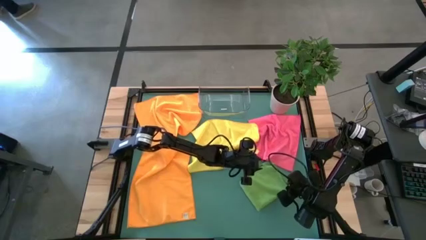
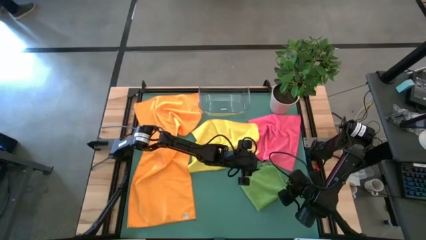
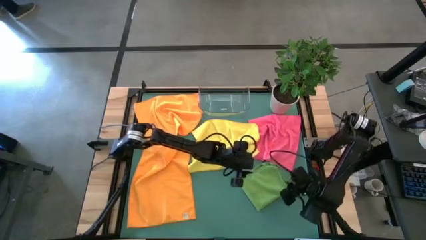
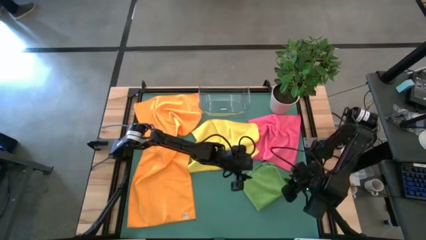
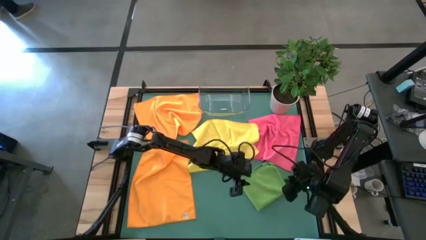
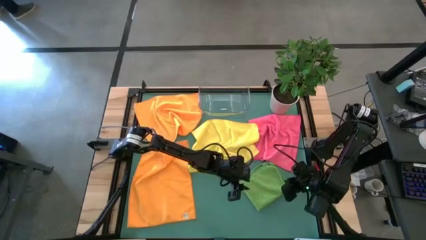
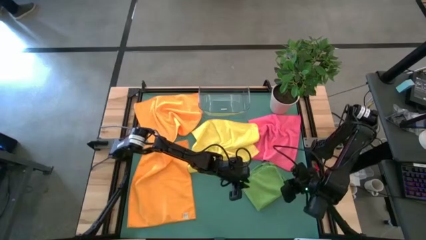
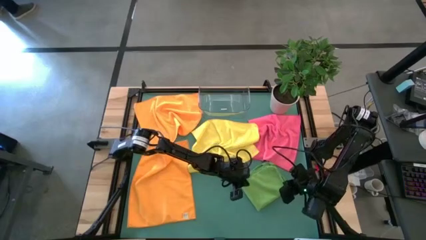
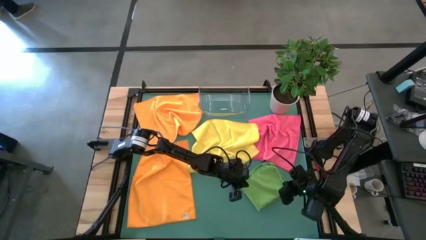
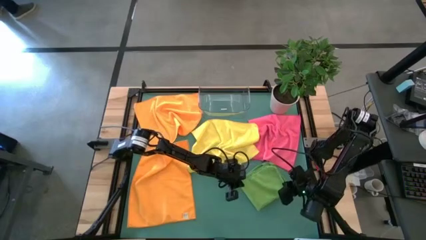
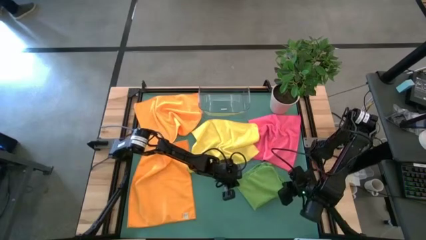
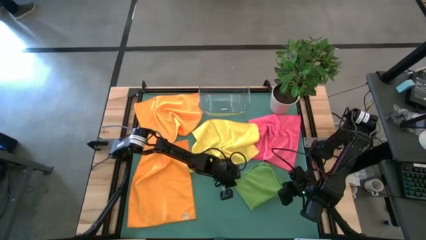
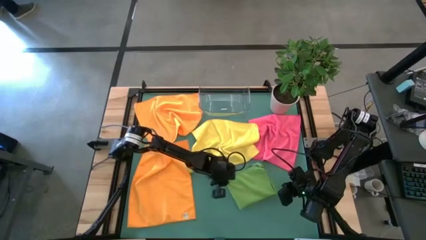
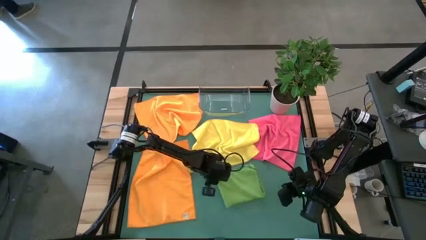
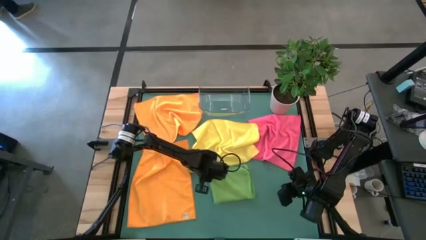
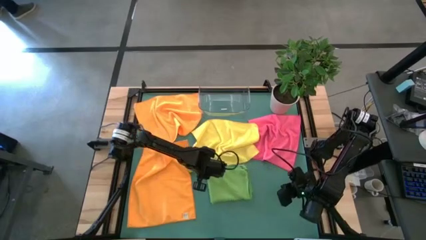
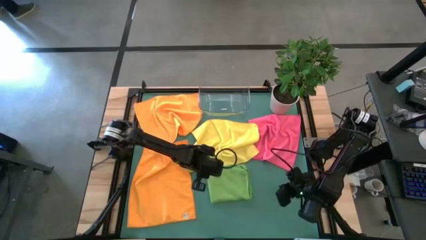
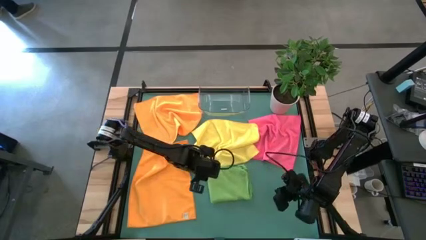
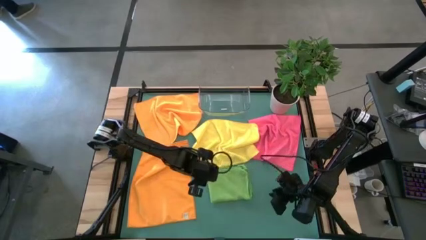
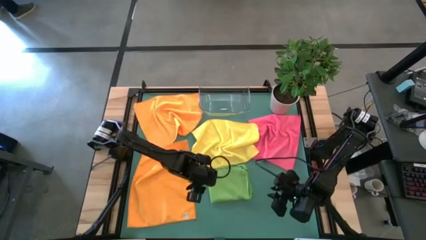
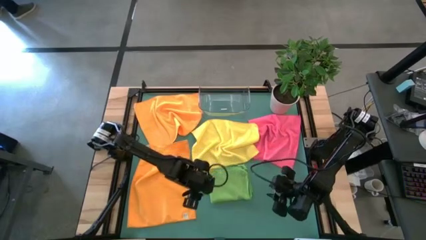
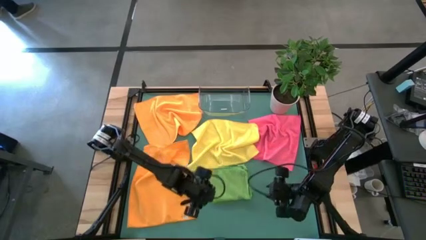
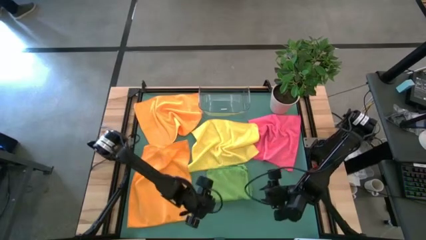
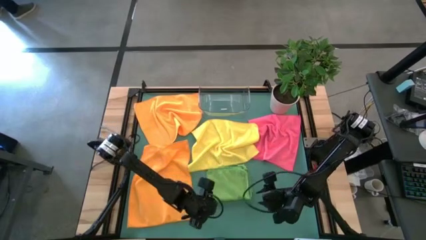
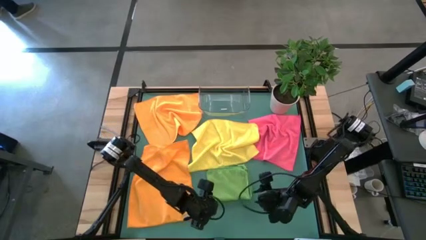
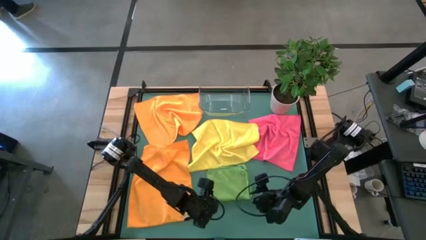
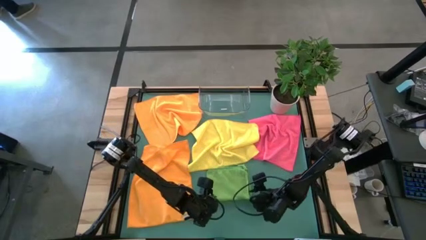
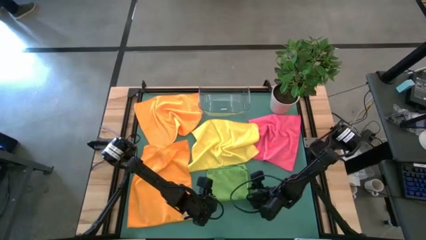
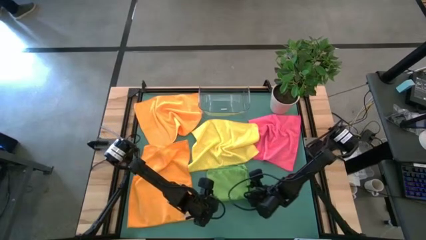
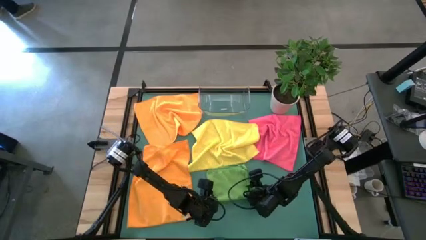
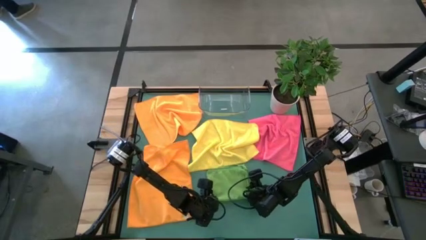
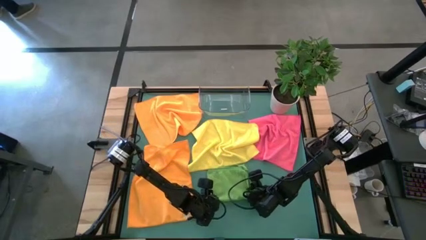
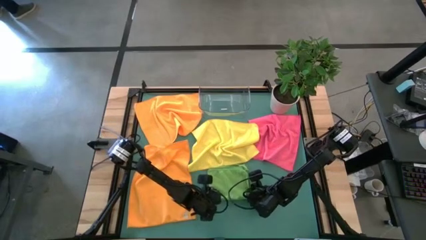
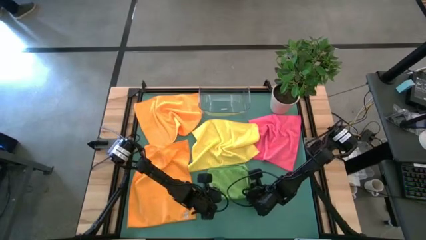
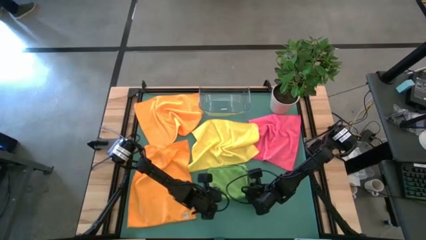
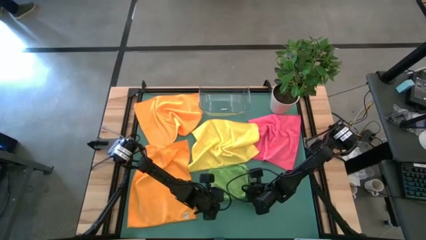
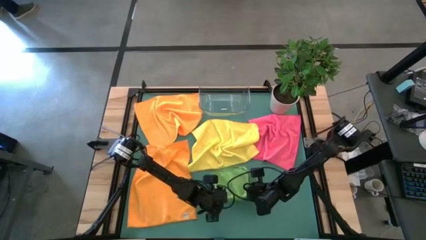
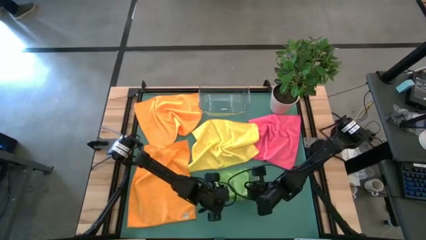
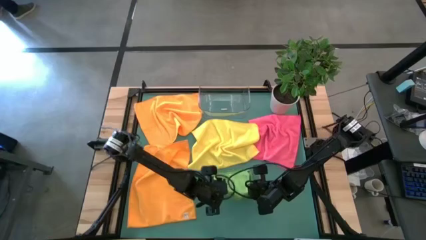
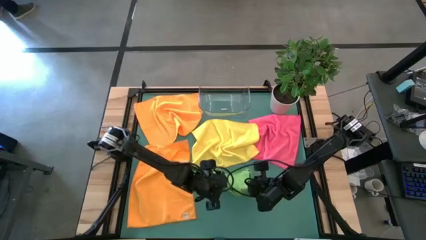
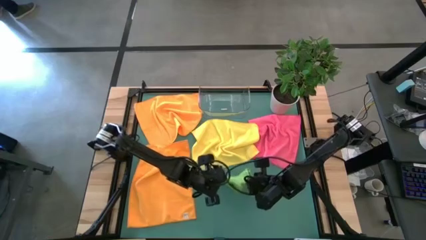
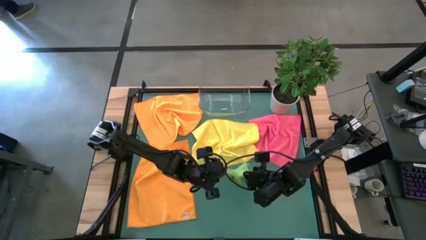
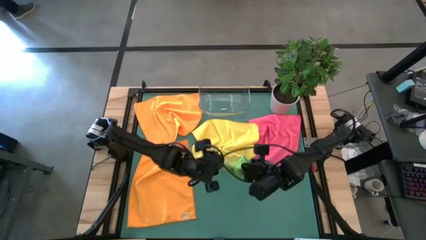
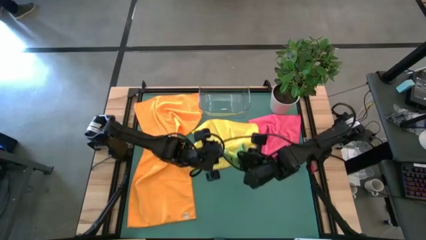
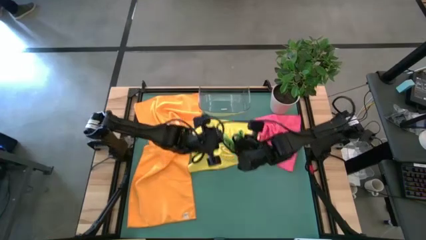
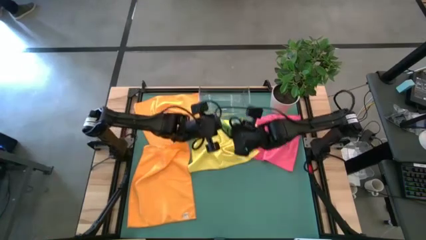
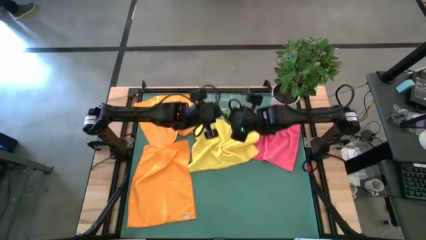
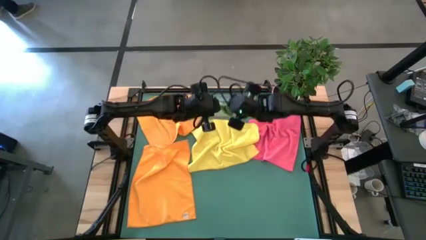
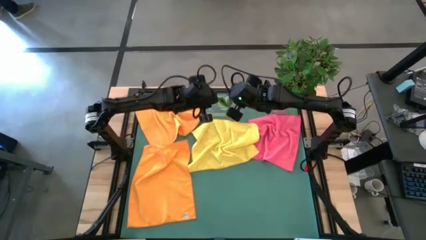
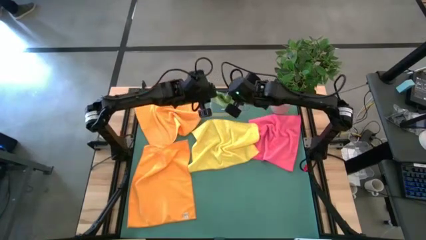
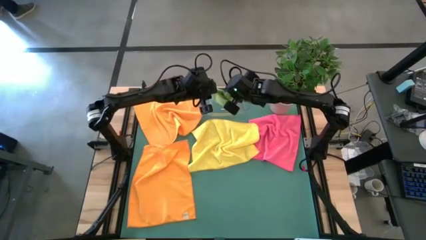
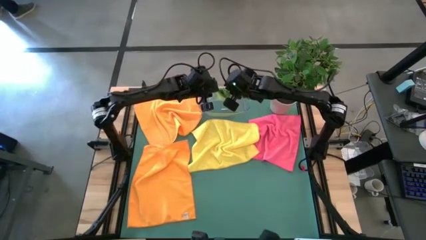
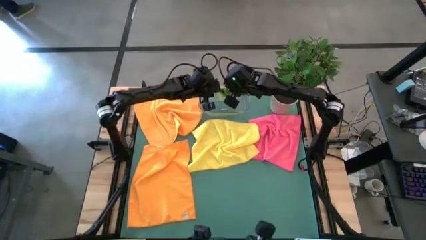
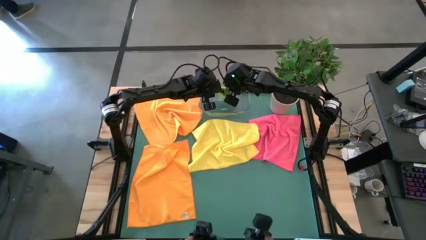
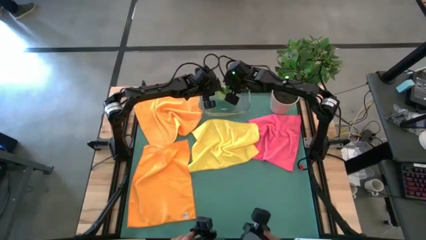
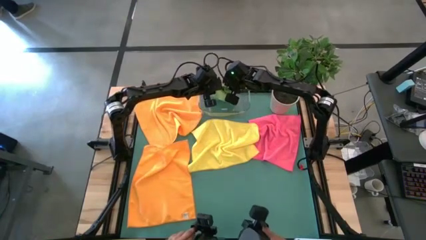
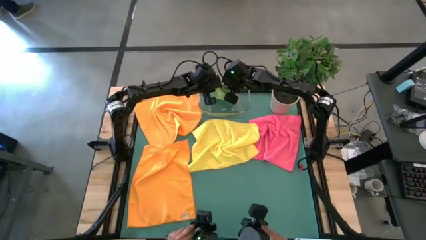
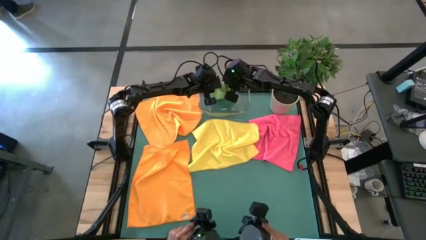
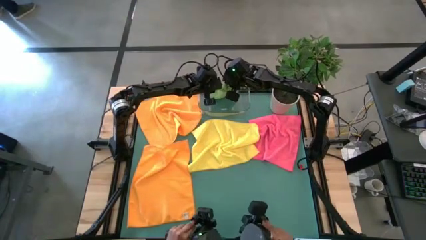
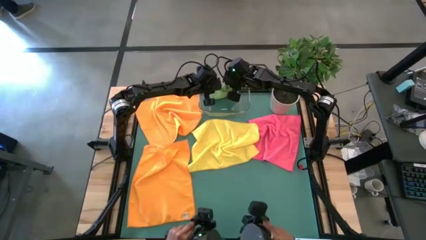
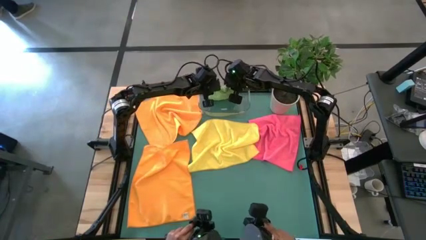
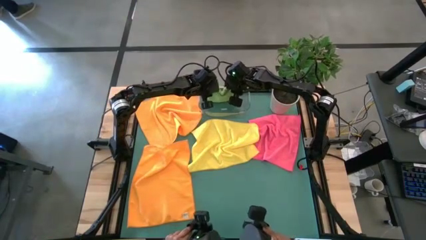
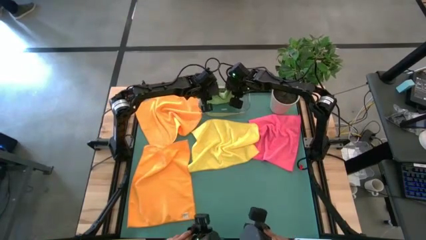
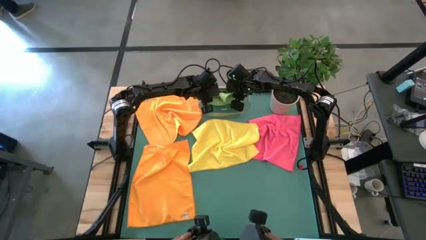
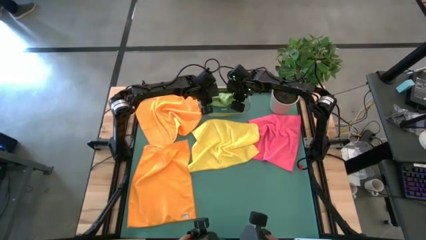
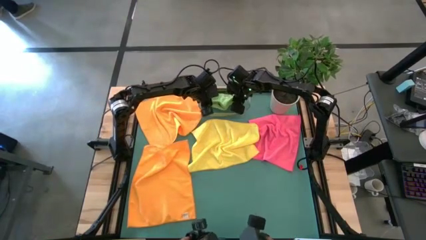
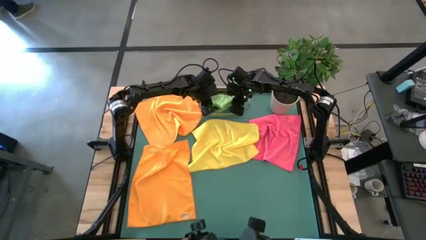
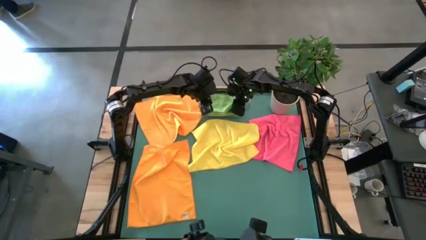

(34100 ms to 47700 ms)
Task: Fold microfiber towels
Put the folded green towel into the transparent bin

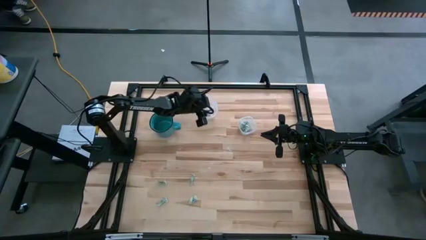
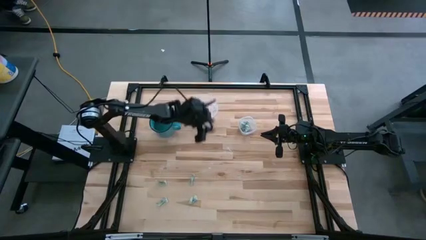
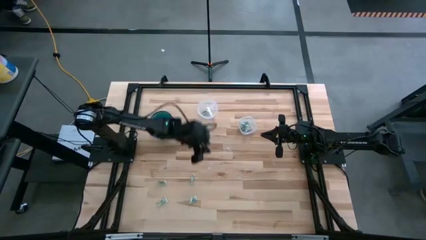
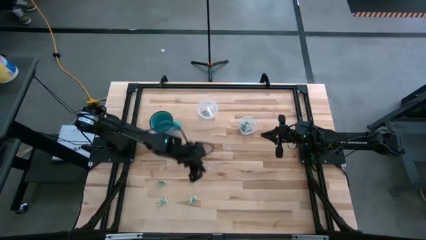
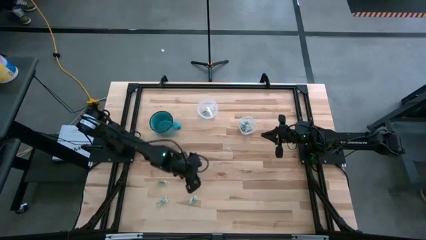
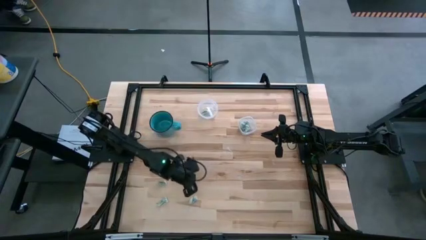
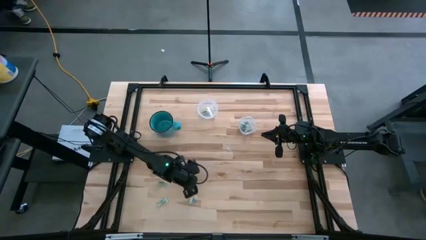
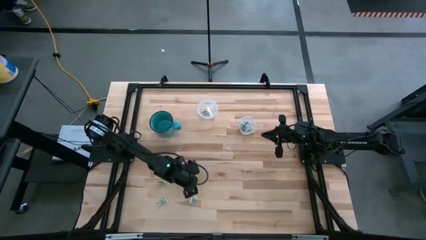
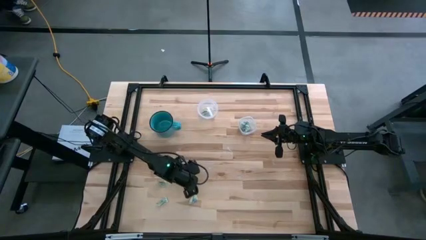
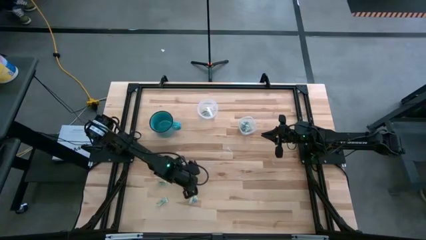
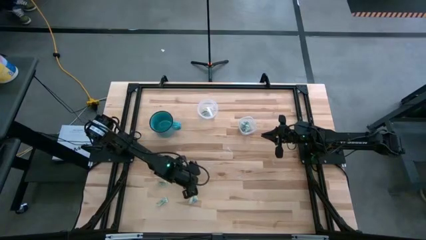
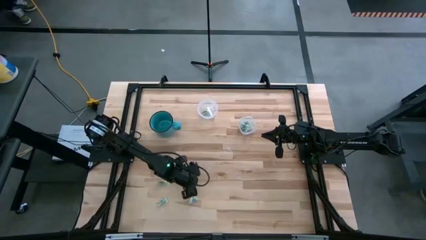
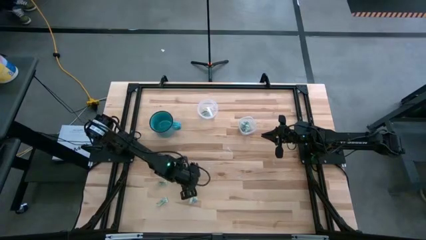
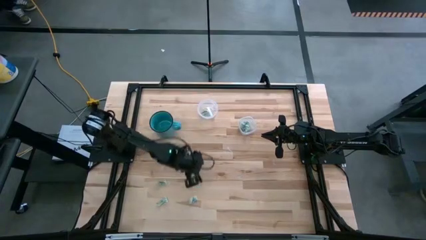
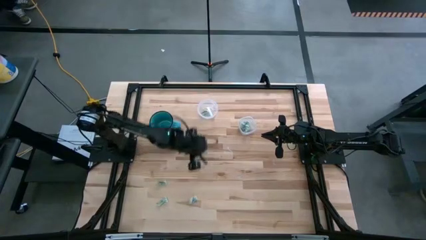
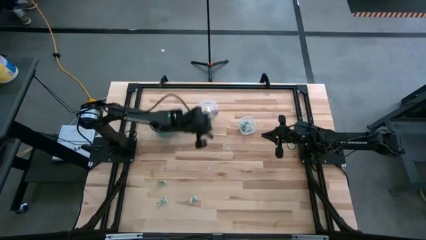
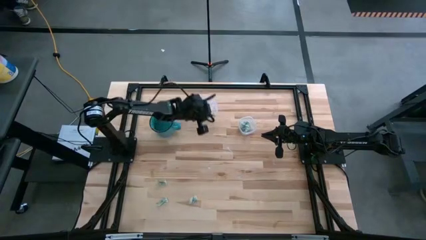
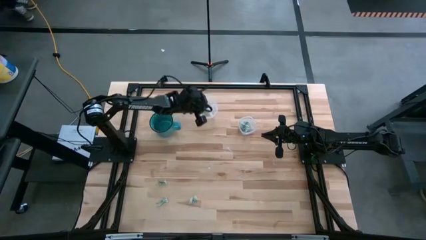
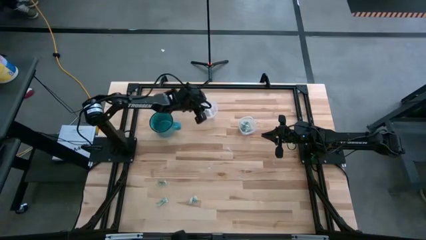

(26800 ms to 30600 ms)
Task: Pick and place items into bin
Put the stevia packet into the large transparent bin
